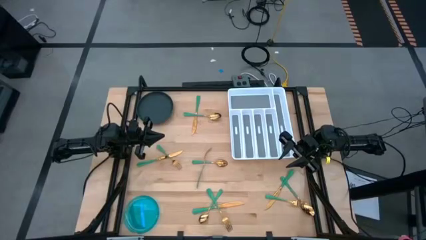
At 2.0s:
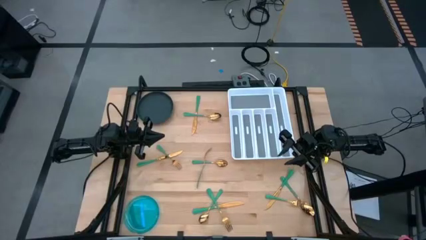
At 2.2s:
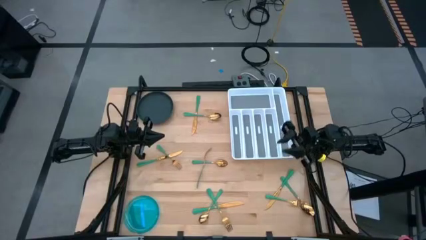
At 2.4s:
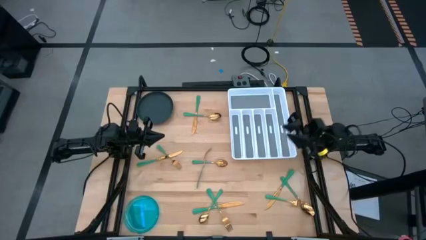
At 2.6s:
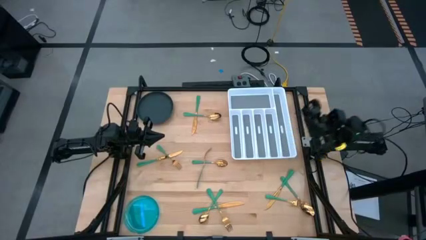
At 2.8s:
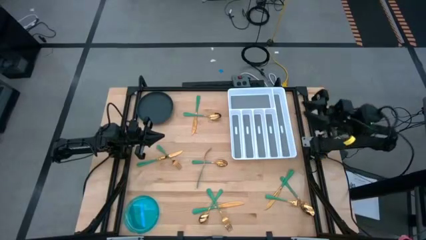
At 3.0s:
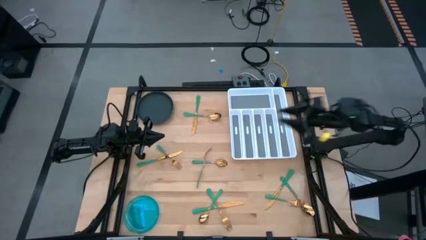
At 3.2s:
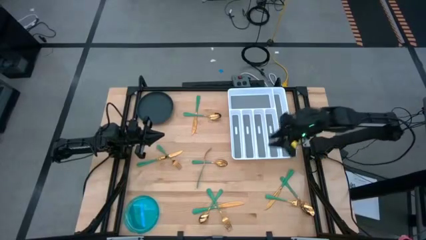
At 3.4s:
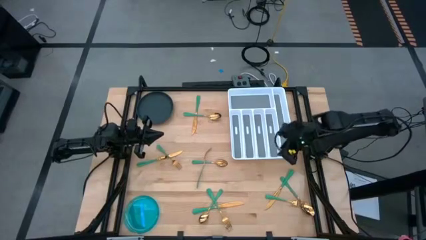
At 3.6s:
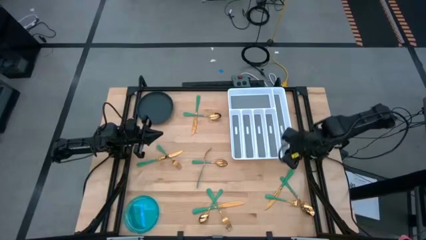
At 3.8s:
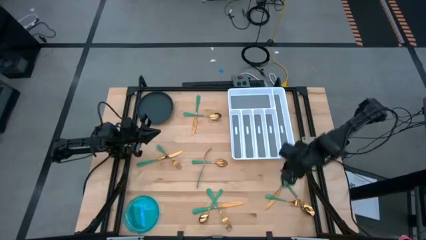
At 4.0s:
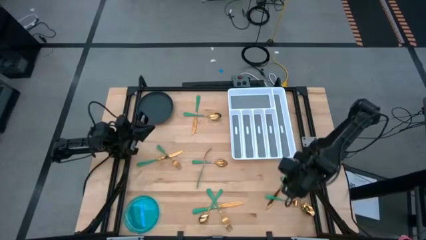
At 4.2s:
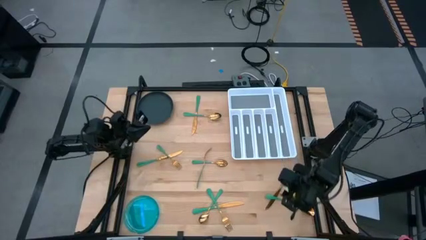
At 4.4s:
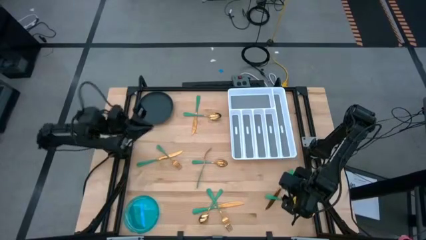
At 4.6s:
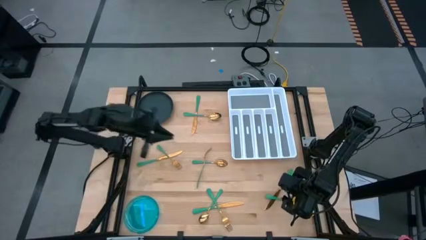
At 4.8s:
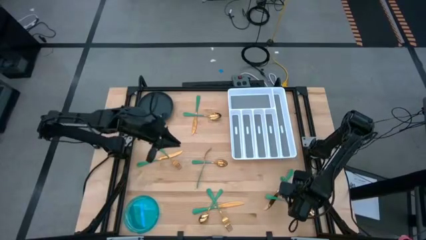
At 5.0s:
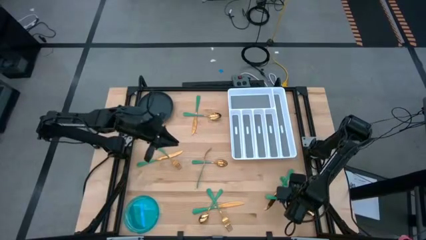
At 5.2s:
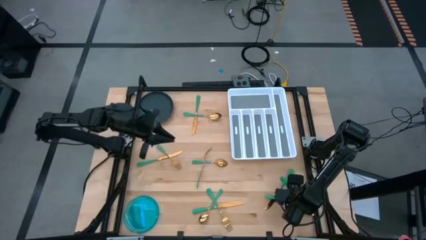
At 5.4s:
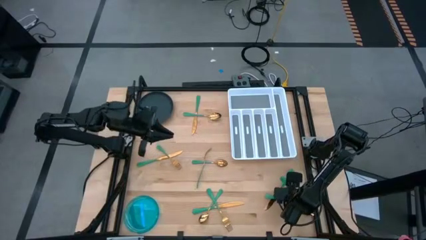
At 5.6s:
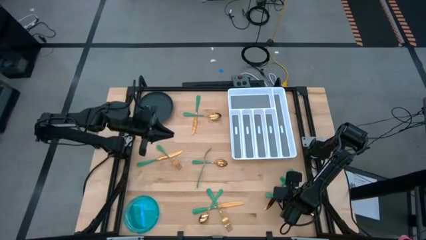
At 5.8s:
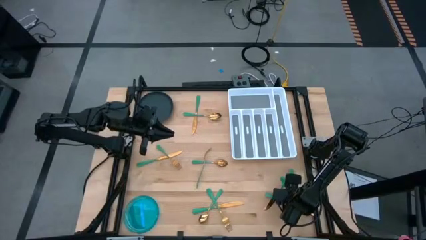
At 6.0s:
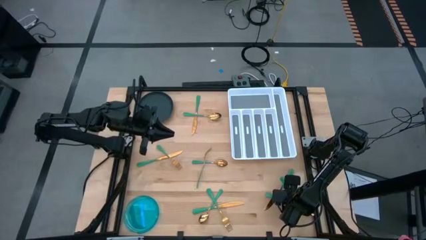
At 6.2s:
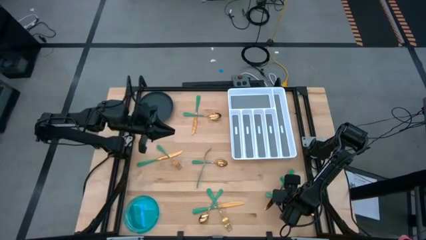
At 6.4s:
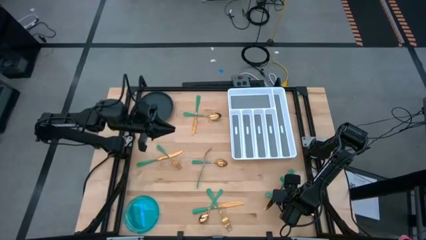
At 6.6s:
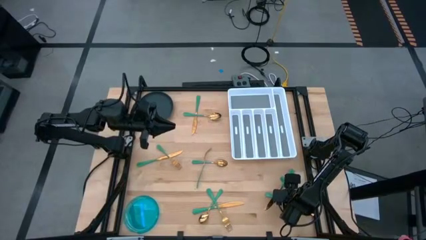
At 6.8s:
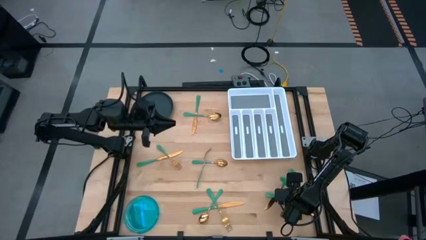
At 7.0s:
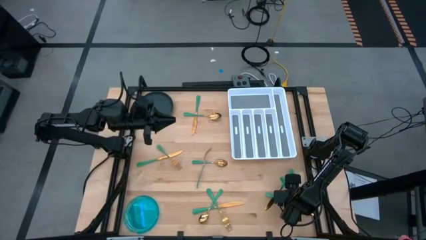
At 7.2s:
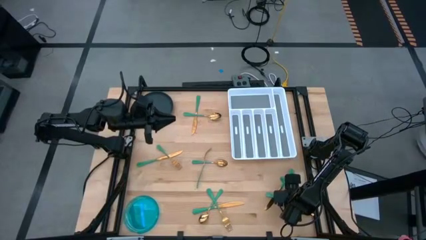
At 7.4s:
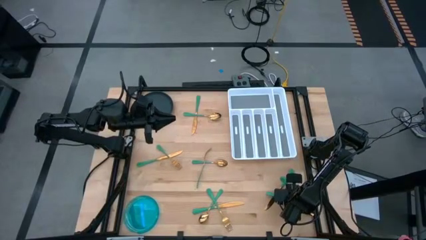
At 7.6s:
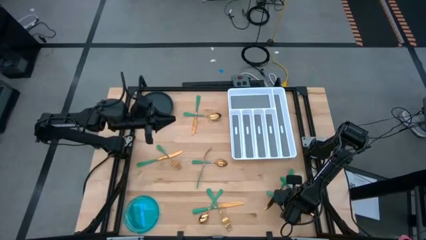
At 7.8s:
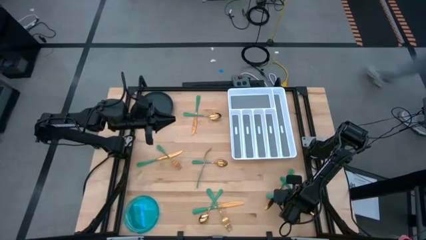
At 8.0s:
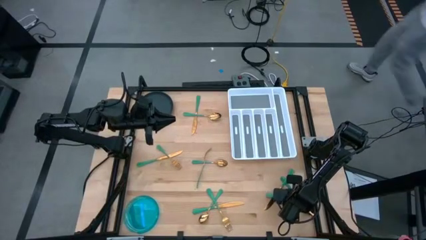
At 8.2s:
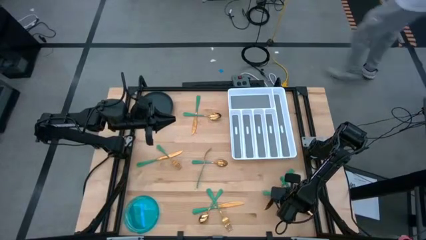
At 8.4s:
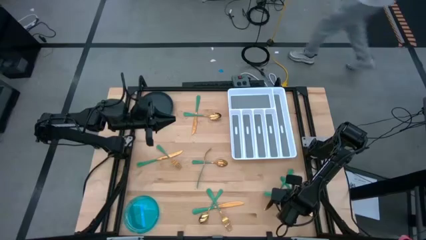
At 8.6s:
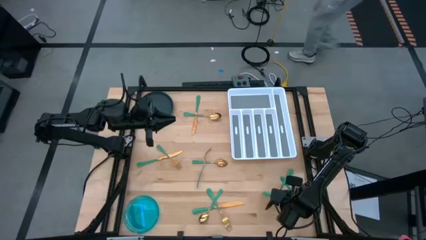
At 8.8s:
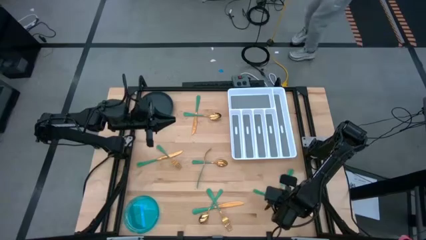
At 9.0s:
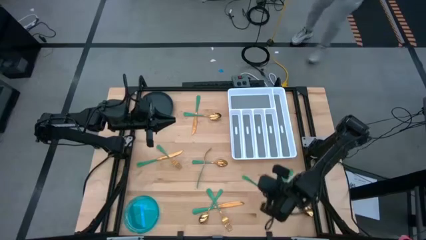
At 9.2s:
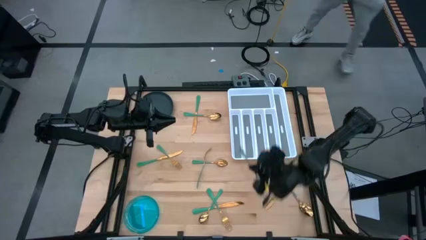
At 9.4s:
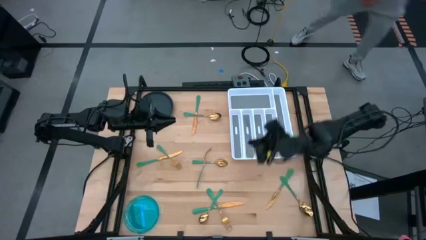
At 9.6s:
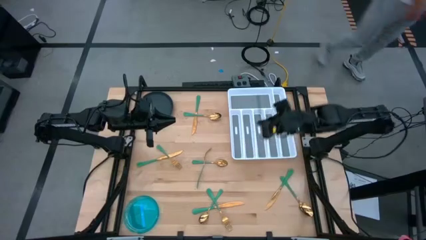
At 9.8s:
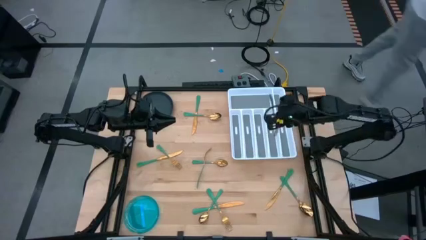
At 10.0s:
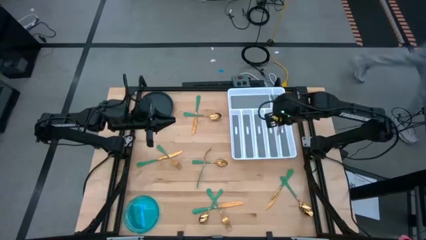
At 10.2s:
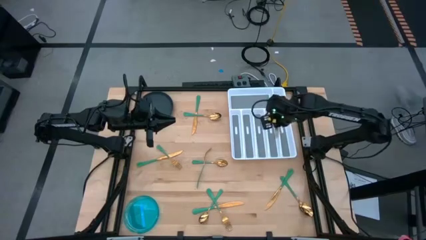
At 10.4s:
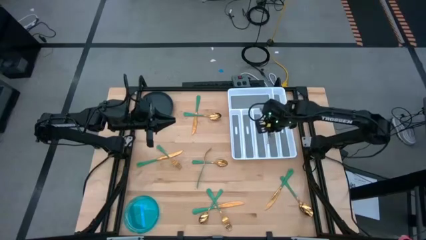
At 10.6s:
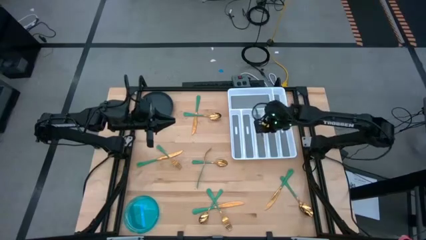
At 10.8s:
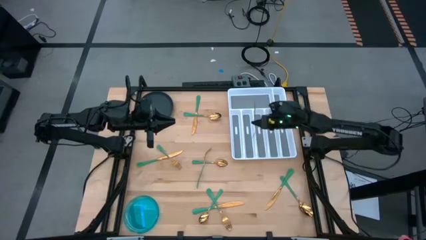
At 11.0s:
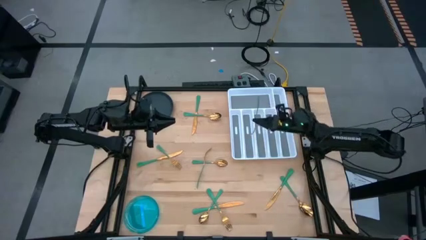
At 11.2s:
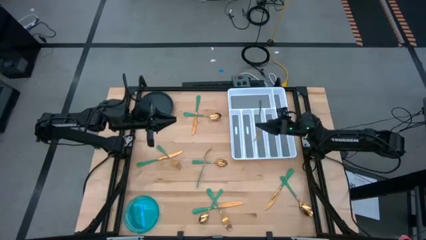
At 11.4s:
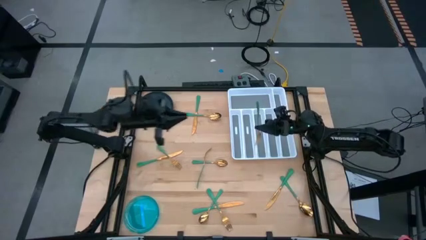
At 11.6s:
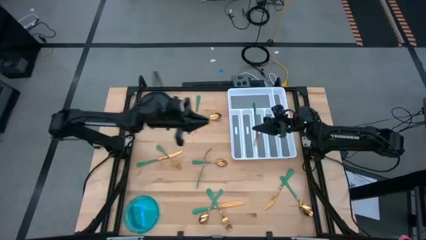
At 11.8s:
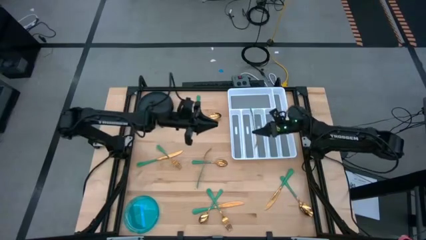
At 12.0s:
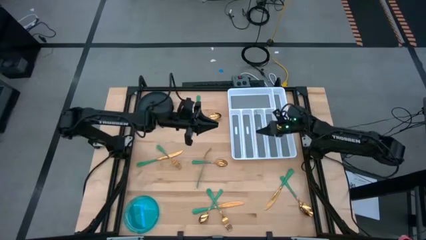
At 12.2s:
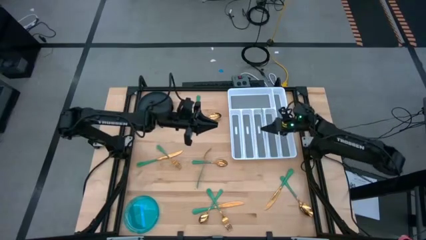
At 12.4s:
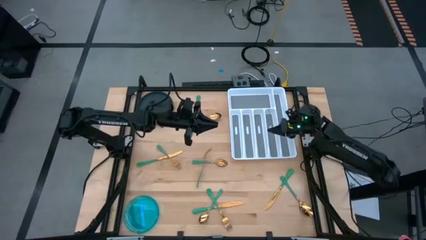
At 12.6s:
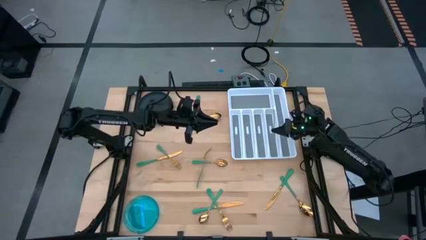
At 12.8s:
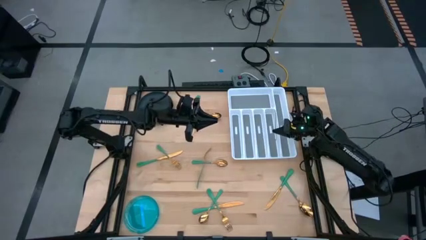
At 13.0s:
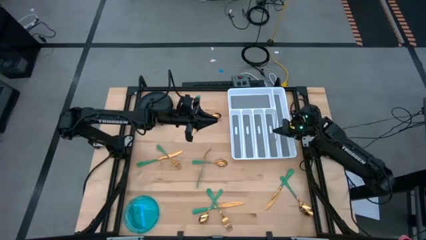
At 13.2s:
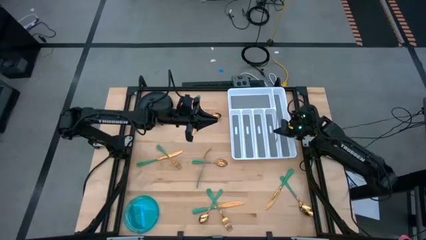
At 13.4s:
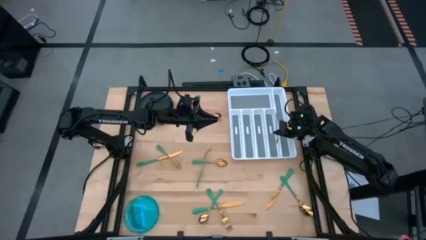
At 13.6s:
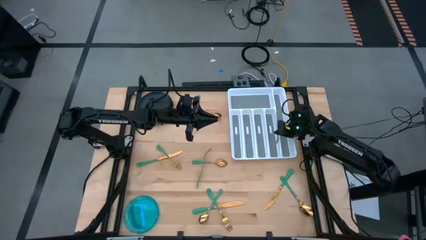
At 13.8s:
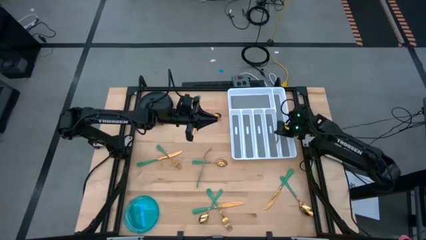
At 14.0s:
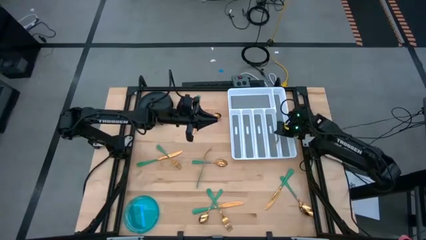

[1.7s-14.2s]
Task: Sort silverware
Put the bottom right green fork on the silverware tray
